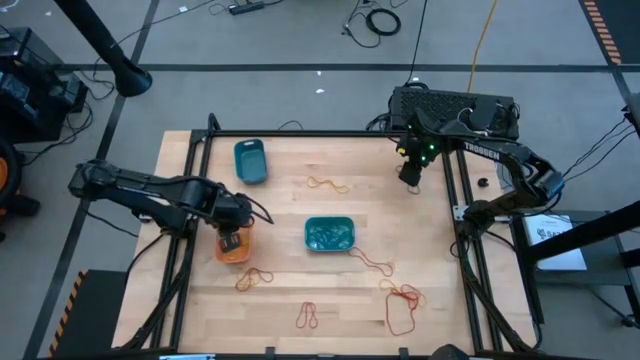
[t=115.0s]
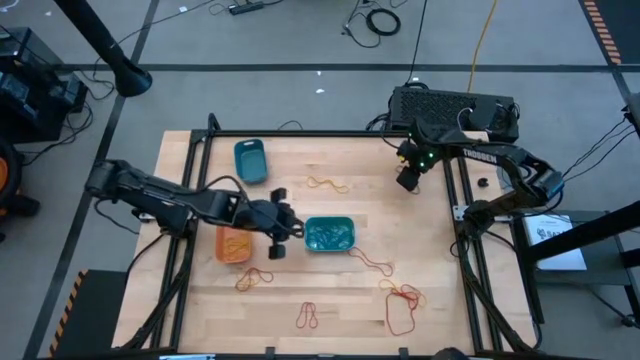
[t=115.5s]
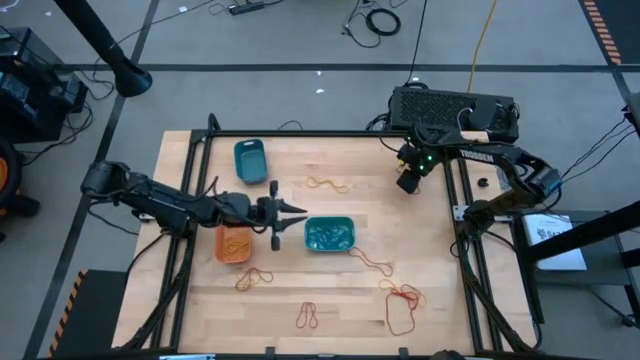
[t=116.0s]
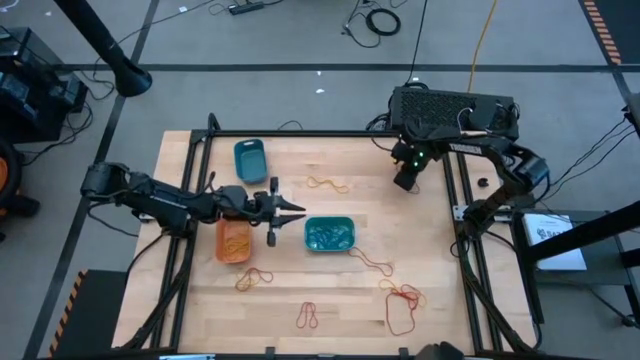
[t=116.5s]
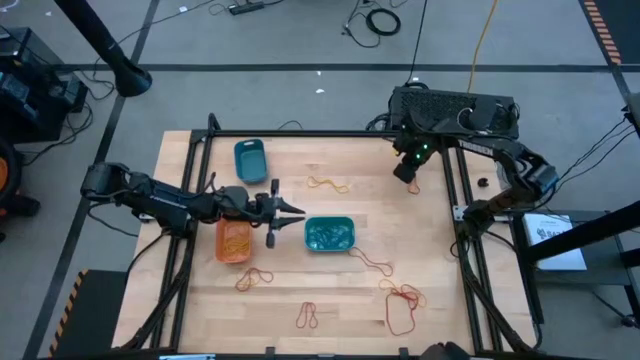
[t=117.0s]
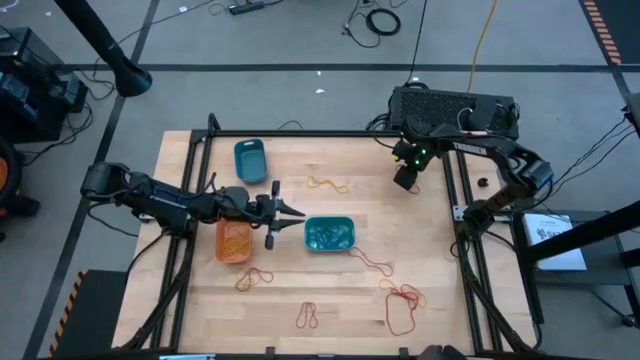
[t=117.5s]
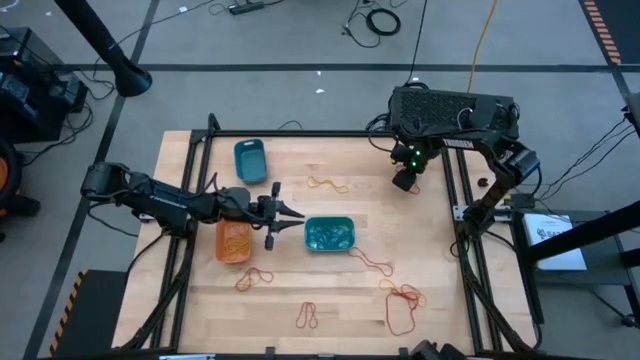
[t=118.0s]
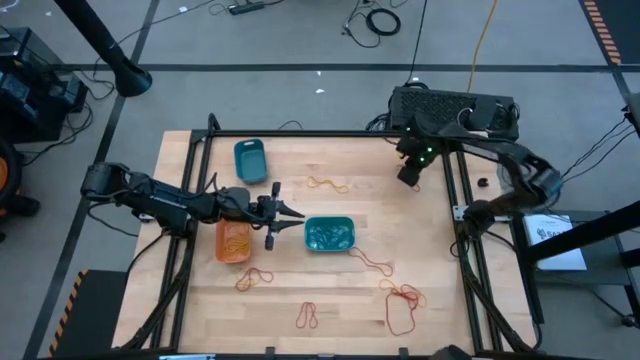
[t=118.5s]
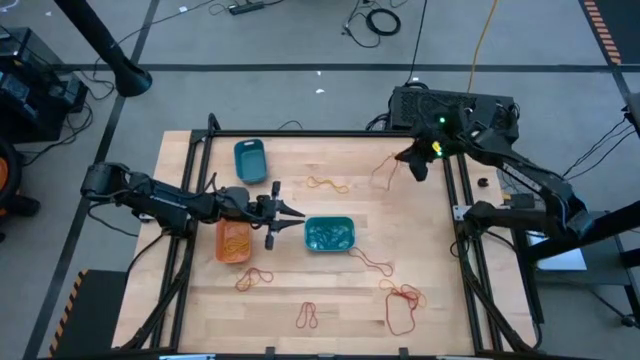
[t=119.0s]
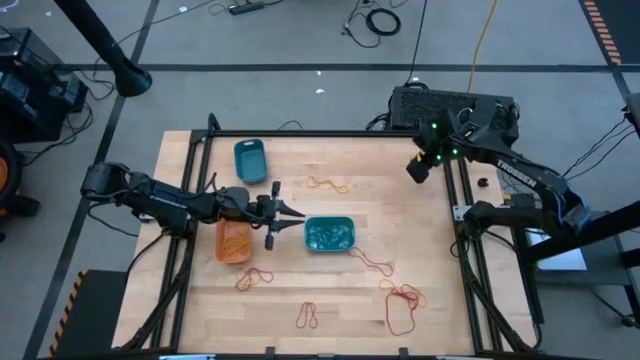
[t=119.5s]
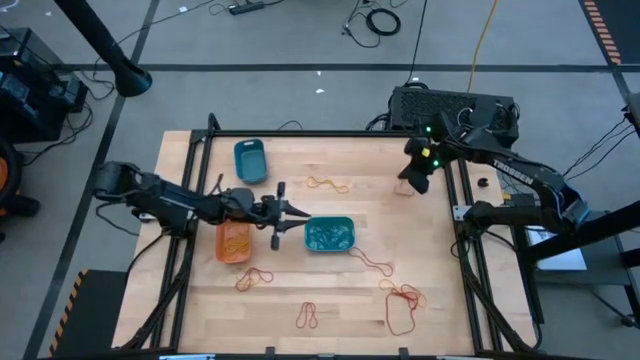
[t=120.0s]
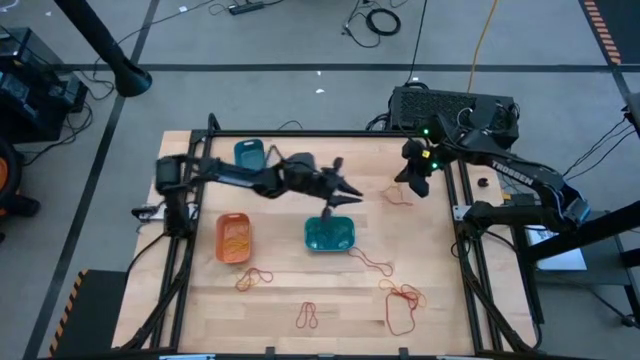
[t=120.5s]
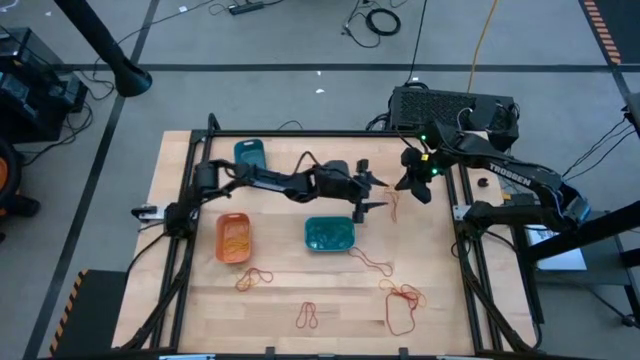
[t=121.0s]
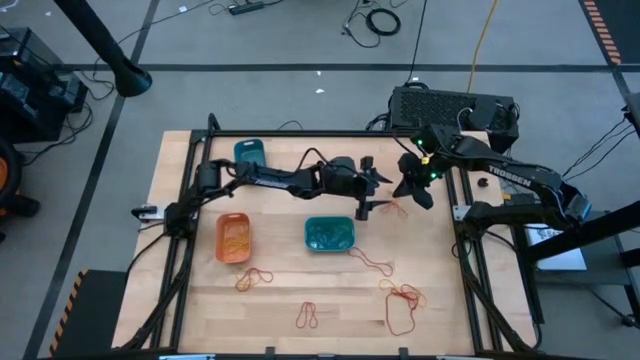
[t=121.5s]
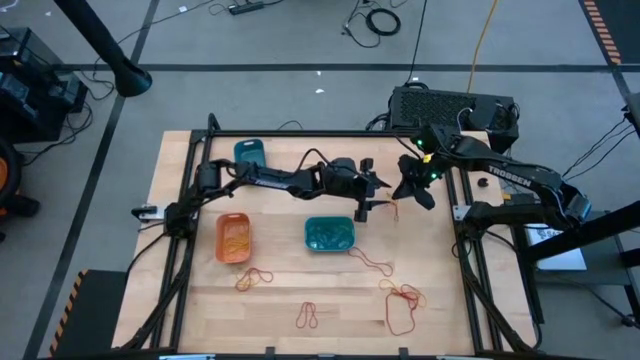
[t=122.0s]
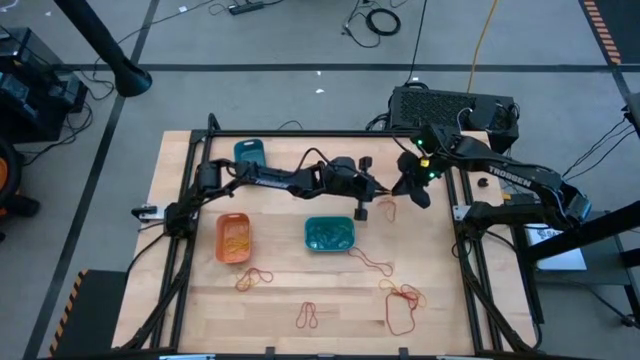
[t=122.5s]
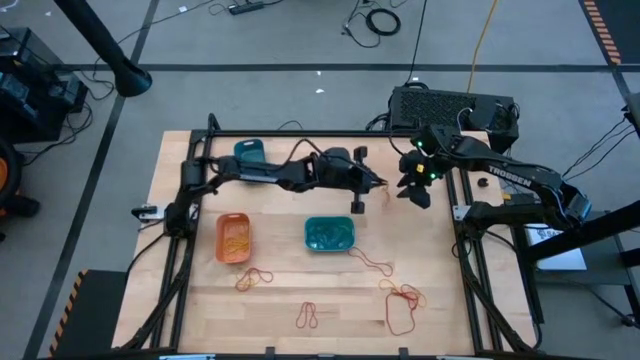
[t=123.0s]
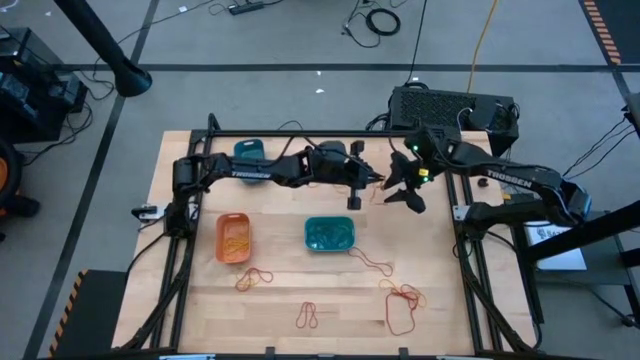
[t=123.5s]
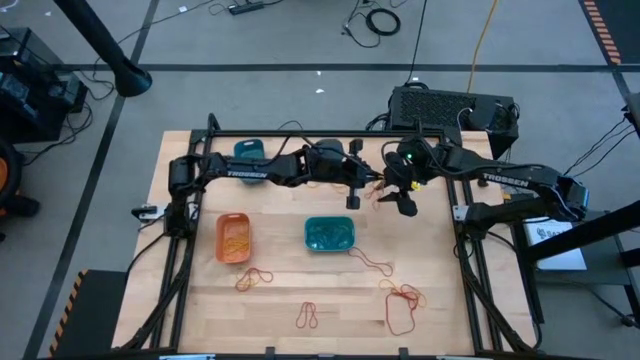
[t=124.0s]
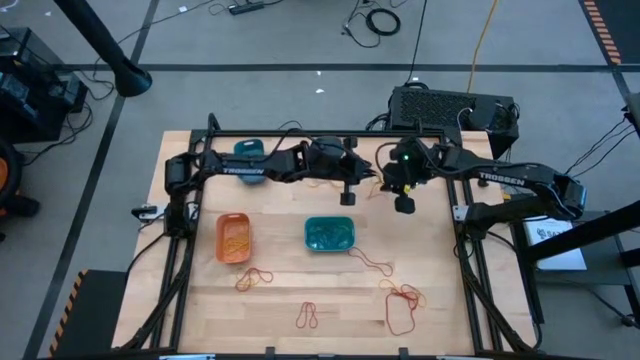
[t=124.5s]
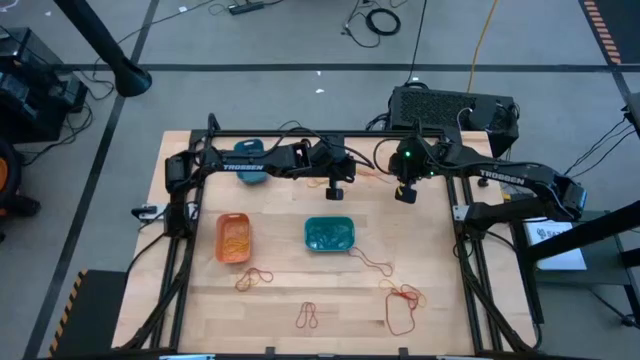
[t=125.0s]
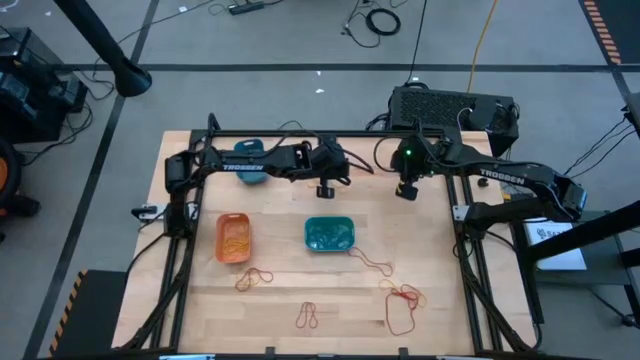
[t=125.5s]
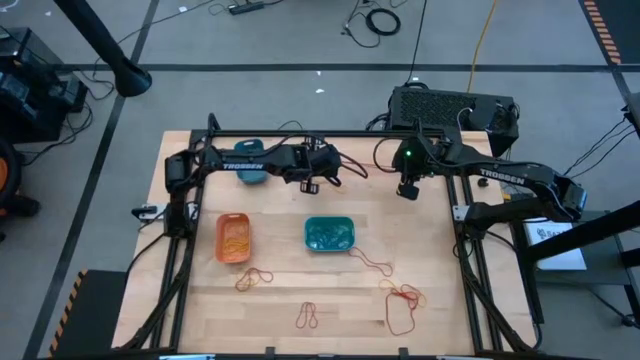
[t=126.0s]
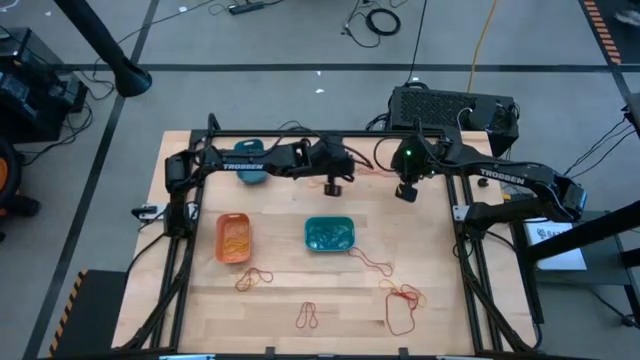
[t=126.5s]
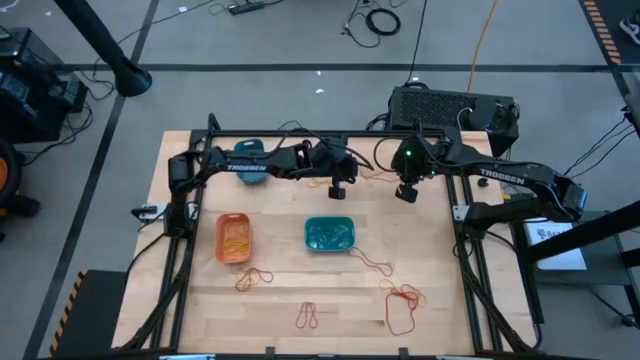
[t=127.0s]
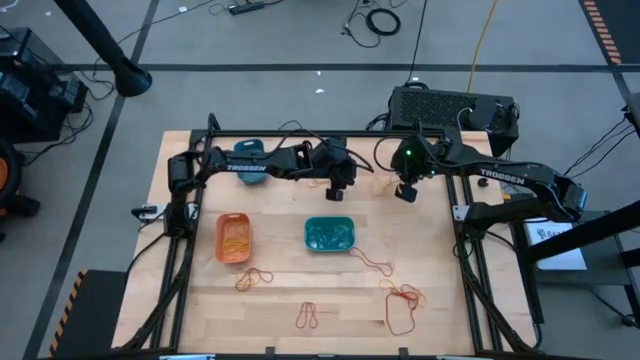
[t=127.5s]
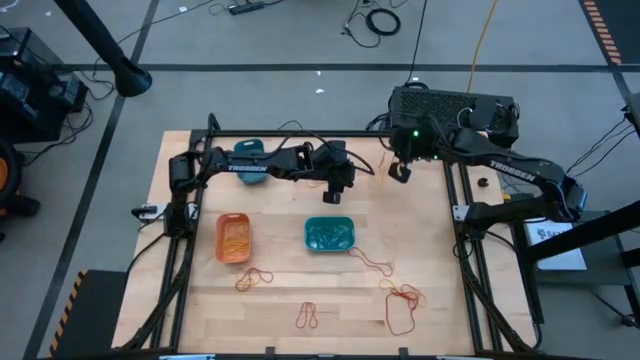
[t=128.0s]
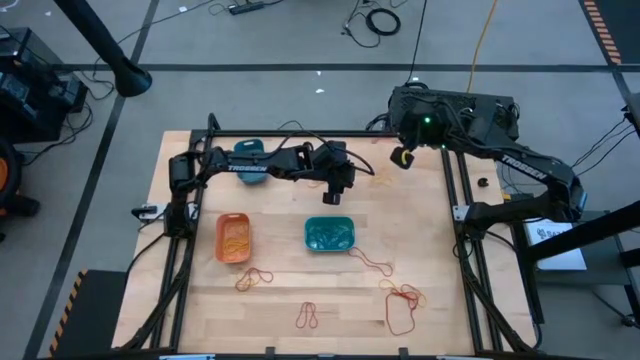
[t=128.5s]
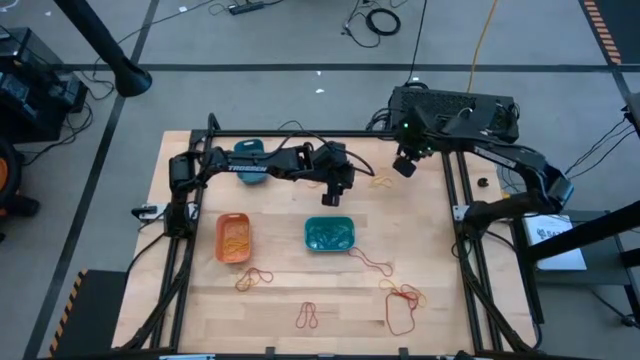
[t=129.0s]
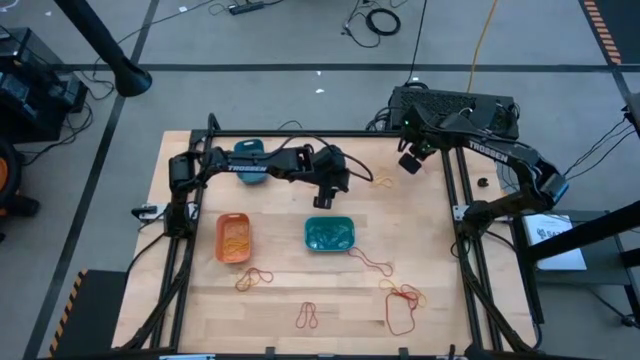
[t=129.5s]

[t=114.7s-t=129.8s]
Task: Sort rubber bands into baskets
Put the yellow rubber band into the orange bin

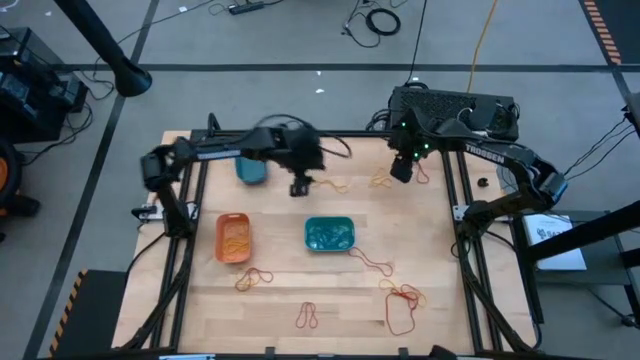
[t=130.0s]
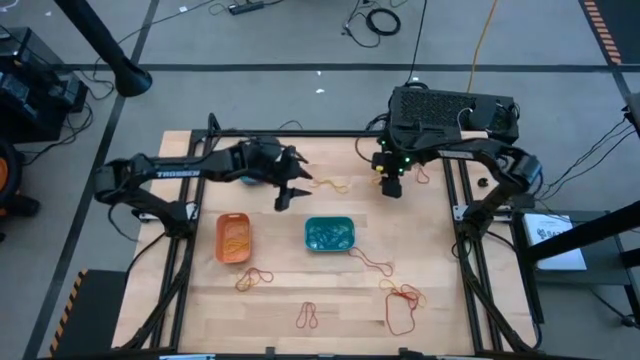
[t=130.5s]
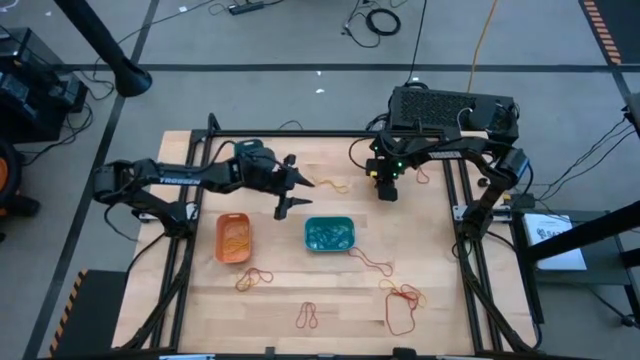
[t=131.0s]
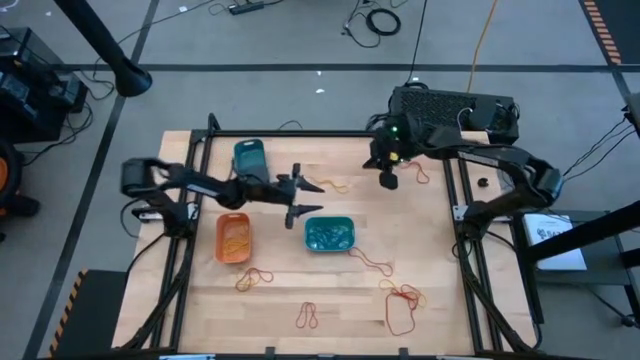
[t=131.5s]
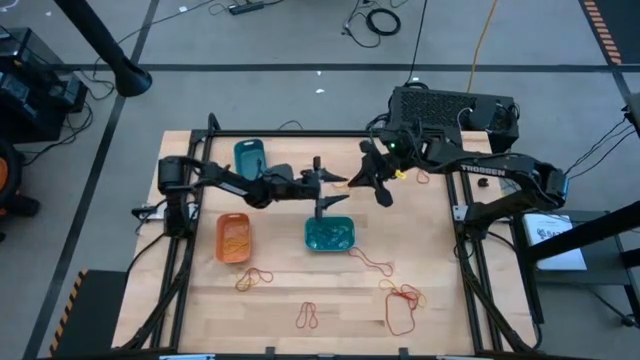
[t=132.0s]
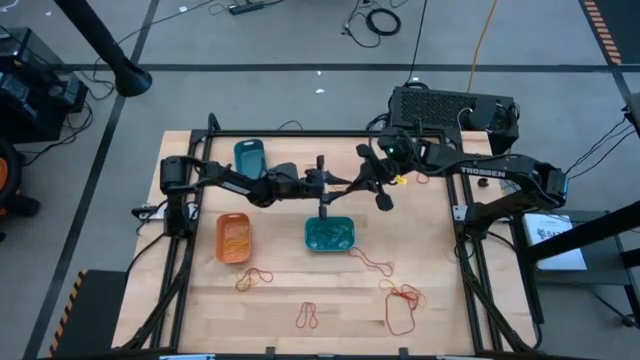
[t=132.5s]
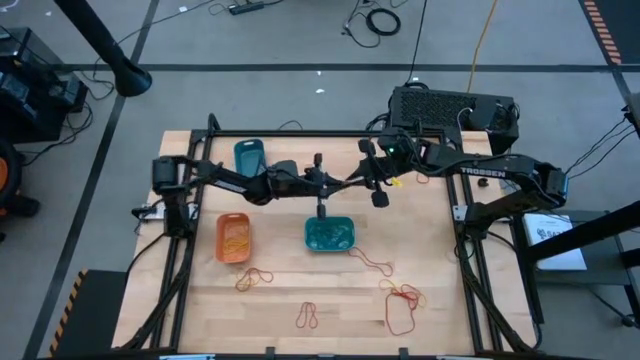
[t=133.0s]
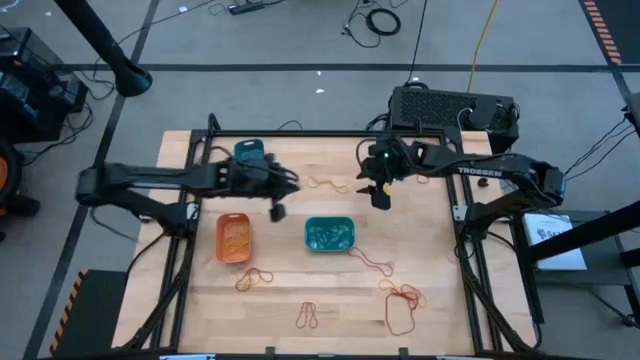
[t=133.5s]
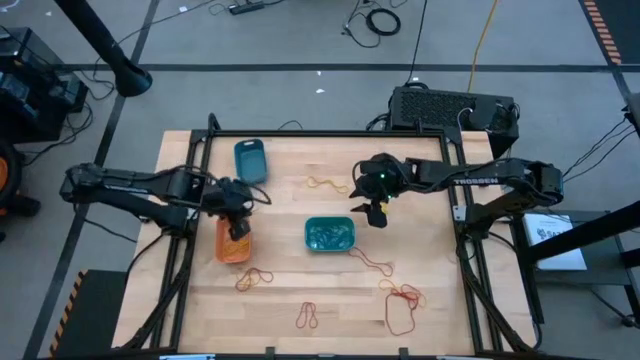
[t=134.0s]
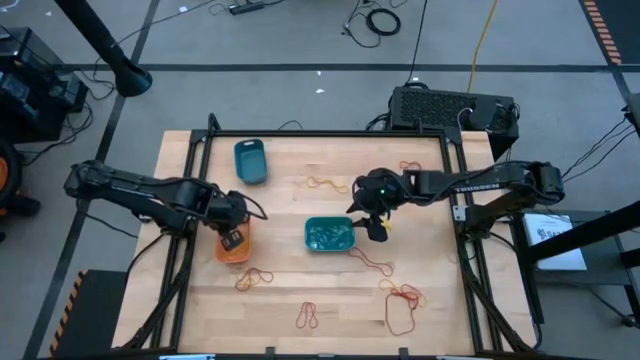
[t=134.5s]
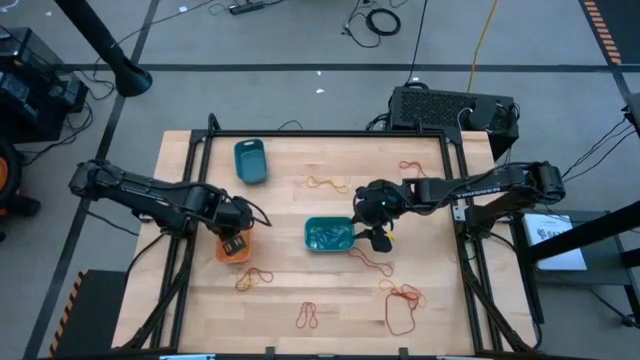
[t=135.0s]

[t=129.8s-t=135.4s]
Put the yellow rubber band into the orange bin
